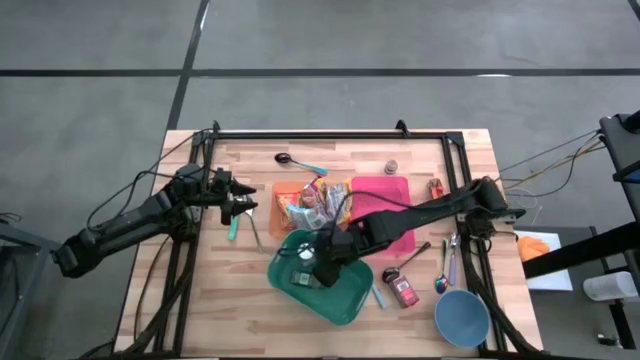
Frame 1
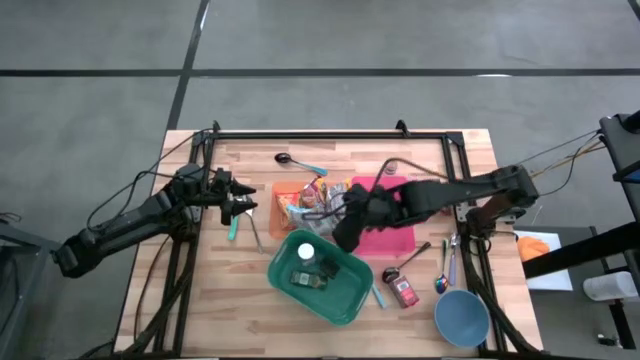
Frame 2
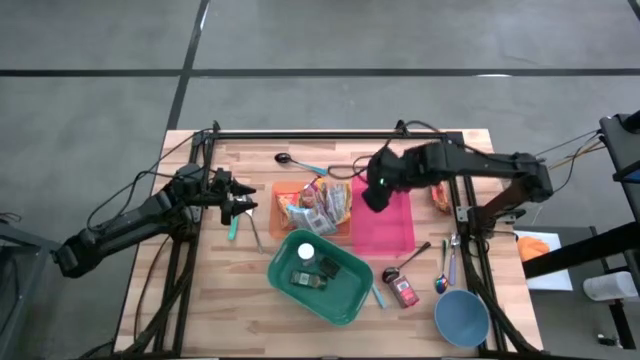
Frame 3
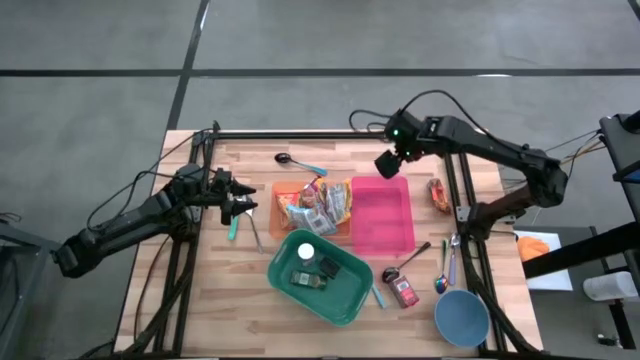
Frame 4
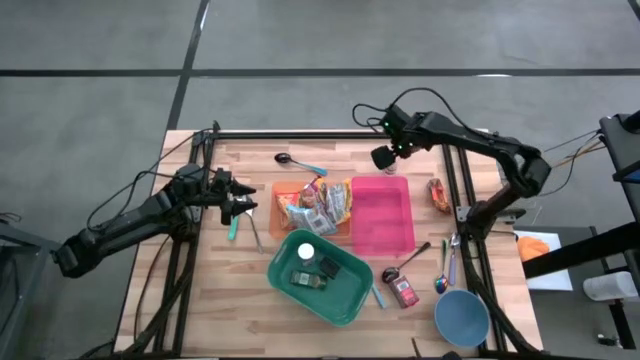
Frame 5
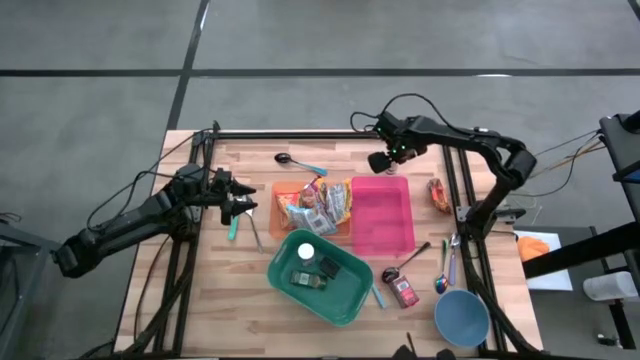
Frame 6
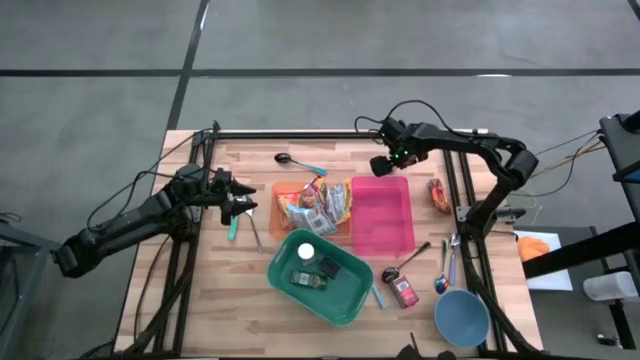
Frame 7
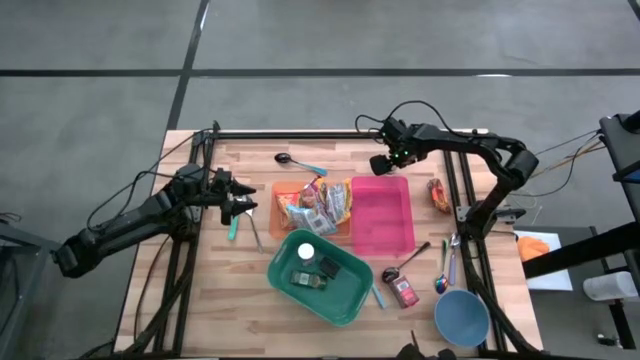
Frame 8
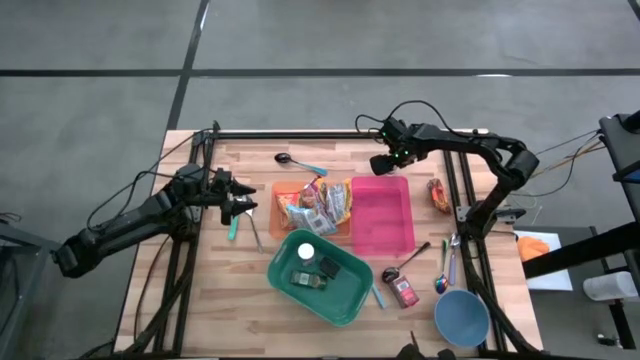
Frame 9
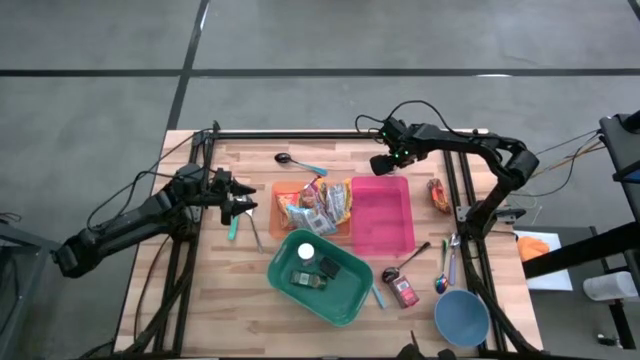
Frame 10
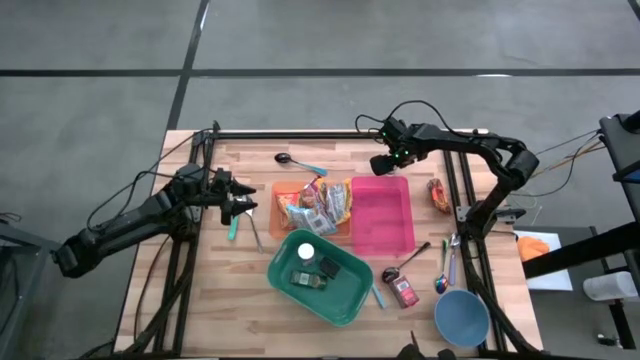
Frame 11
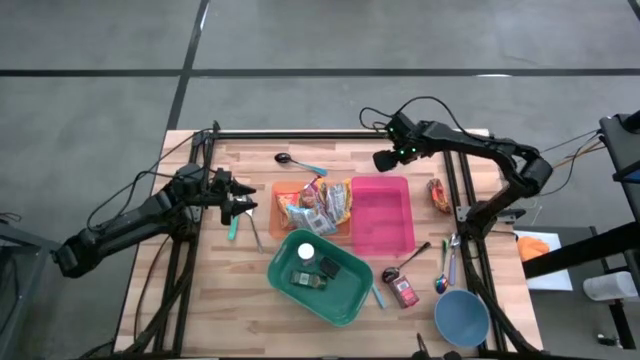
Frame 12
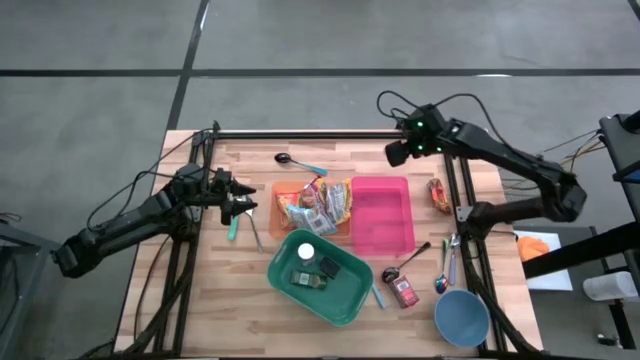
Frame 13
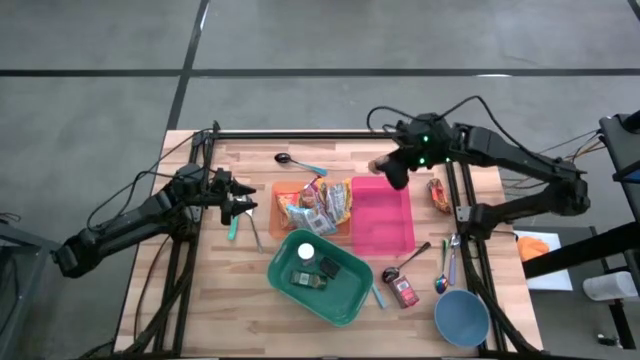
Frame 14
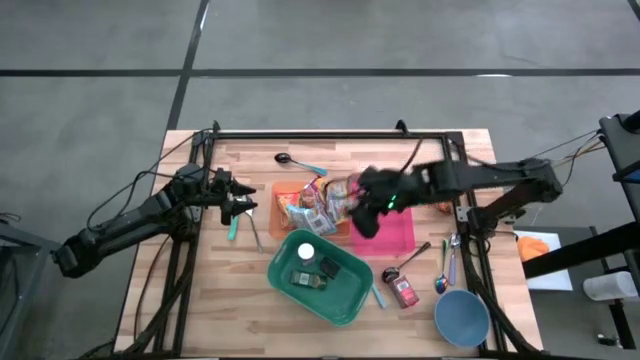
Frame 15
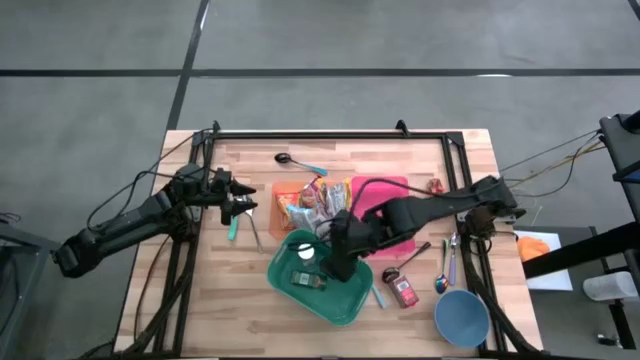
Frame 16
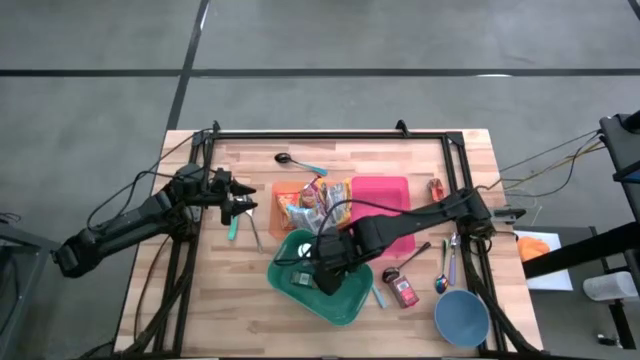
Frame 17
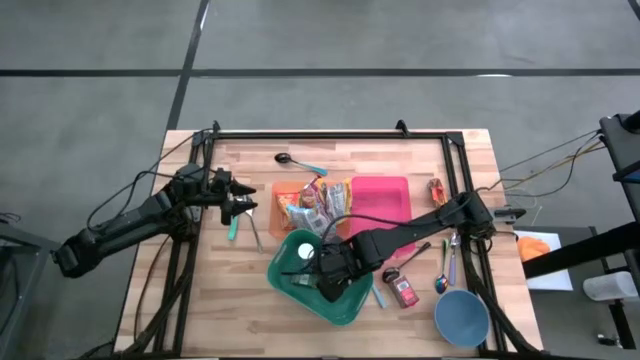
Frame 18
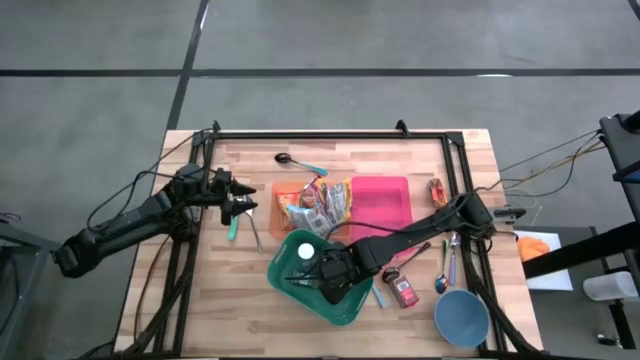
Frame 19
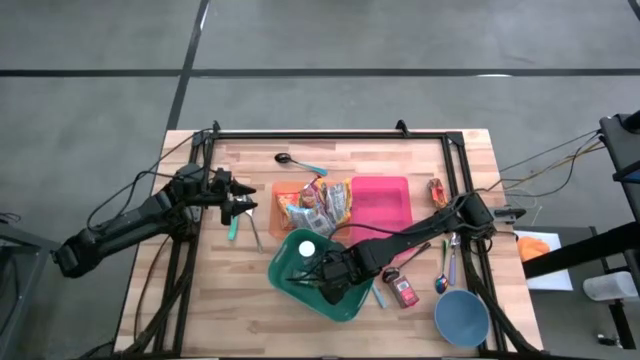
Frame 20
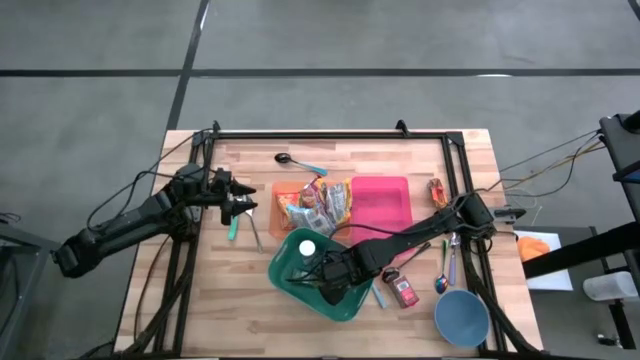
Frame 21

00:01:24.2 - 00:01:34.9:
Put the brown seasoning bottle into the green bin

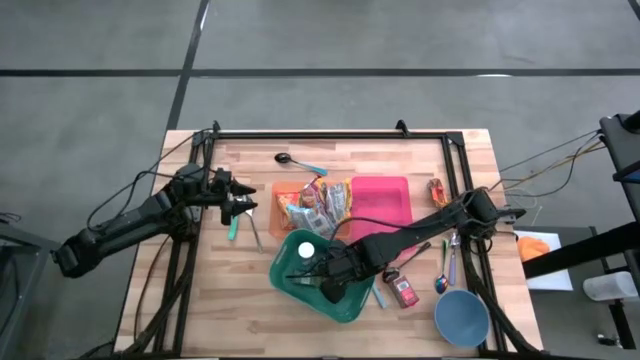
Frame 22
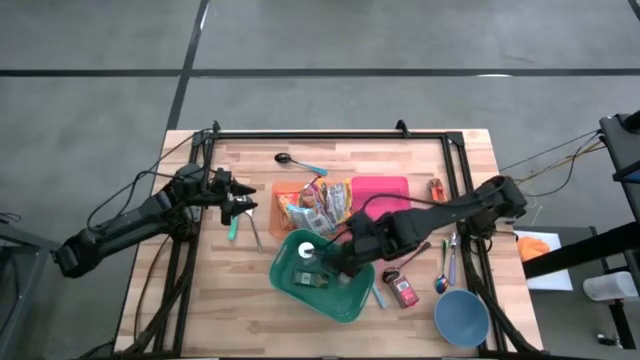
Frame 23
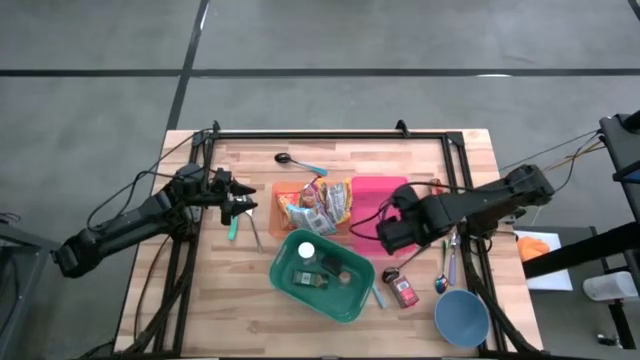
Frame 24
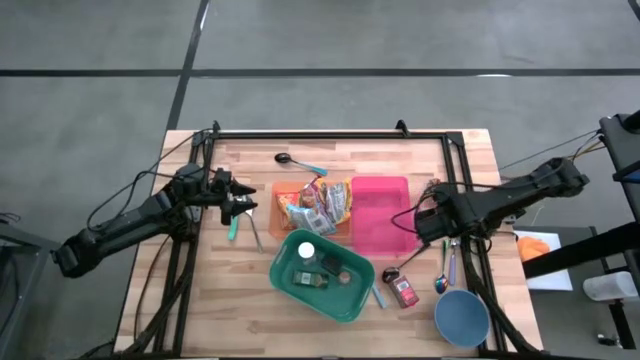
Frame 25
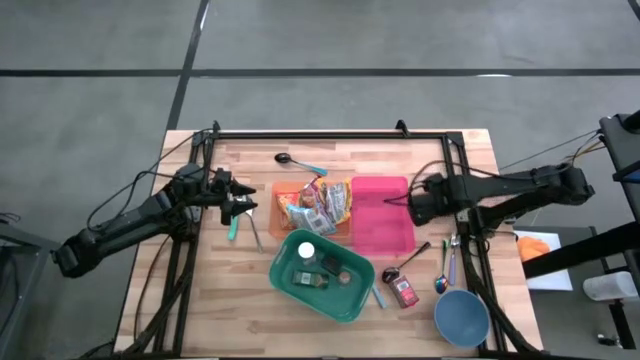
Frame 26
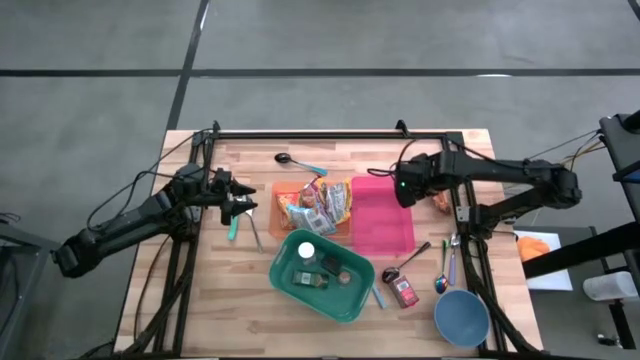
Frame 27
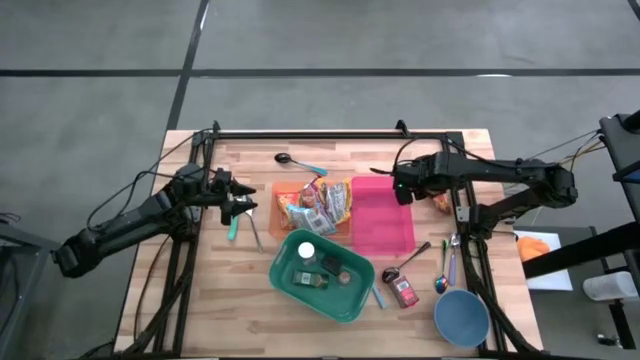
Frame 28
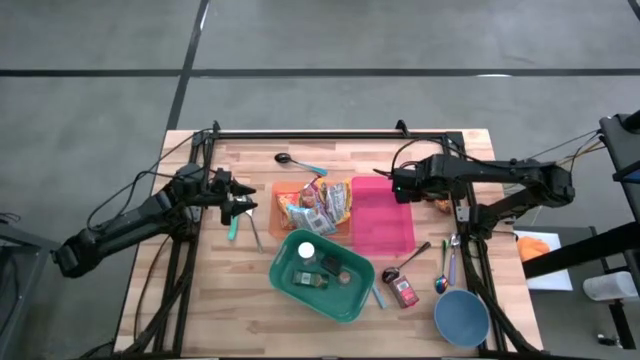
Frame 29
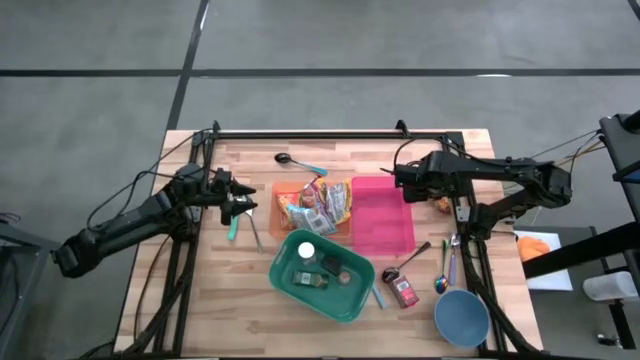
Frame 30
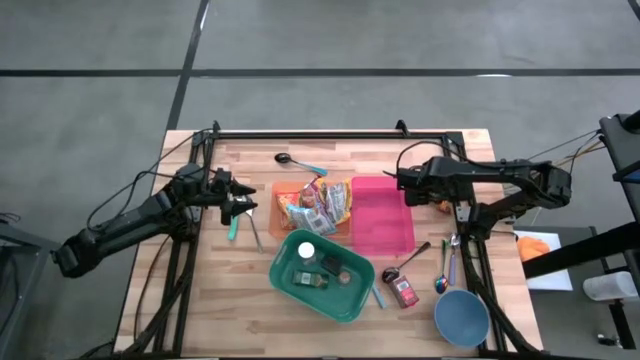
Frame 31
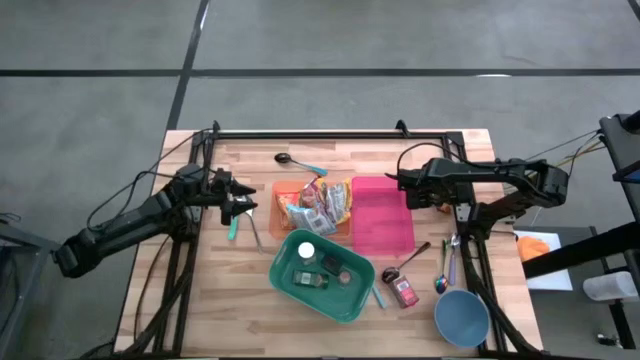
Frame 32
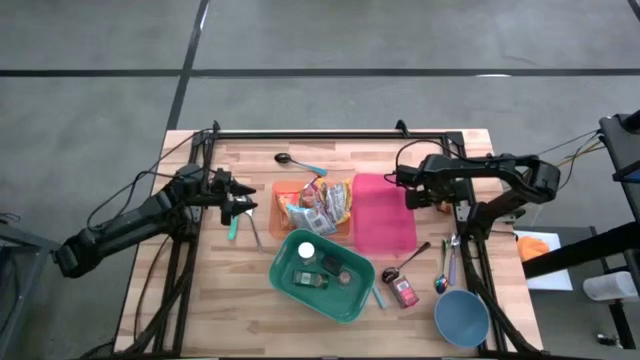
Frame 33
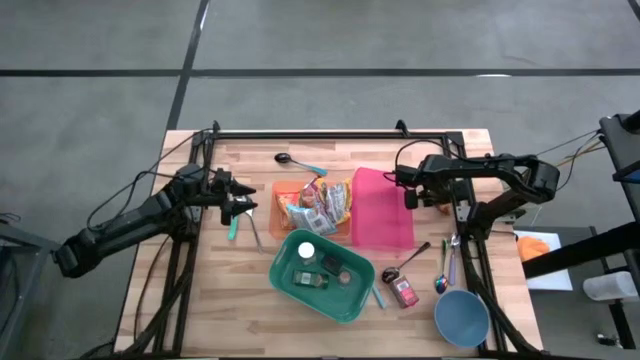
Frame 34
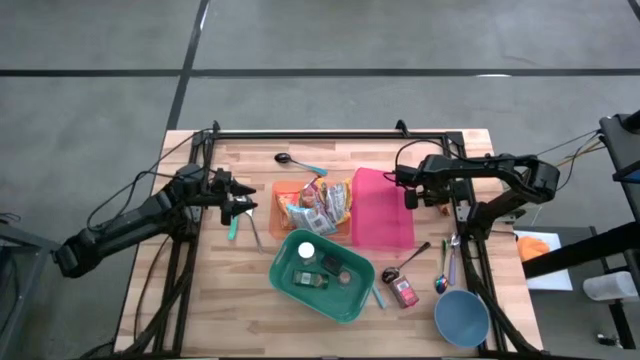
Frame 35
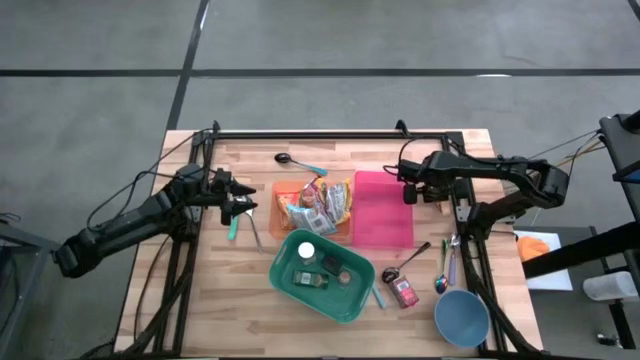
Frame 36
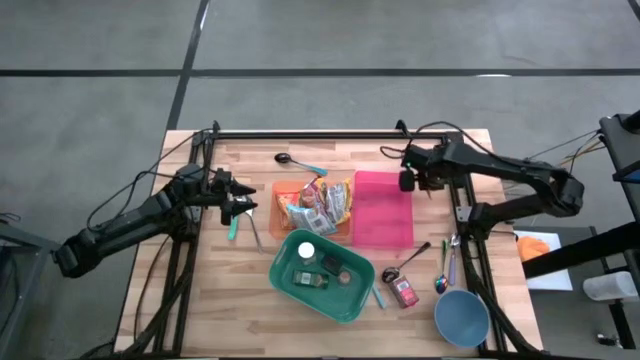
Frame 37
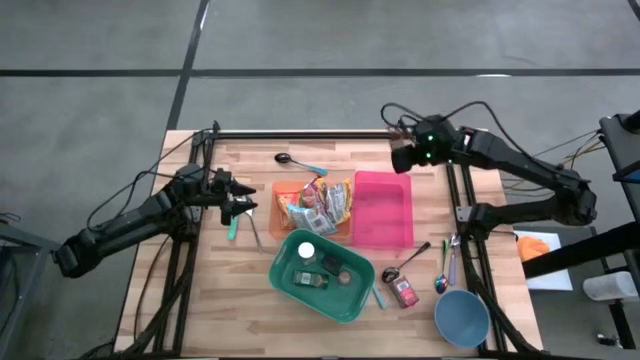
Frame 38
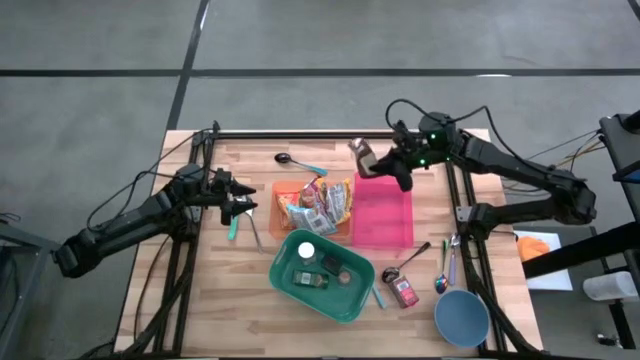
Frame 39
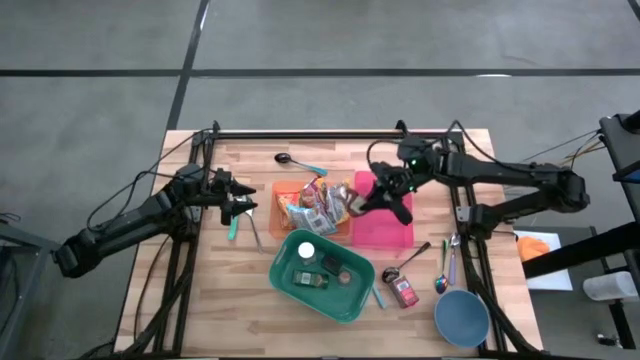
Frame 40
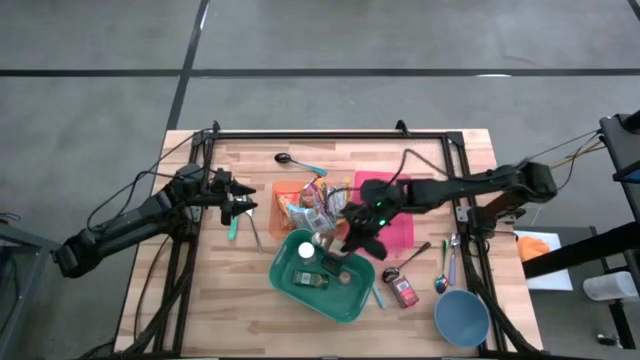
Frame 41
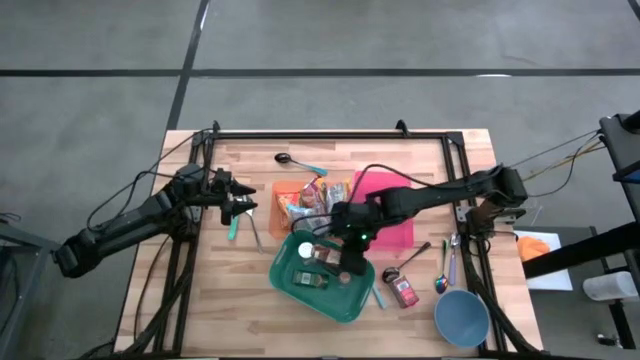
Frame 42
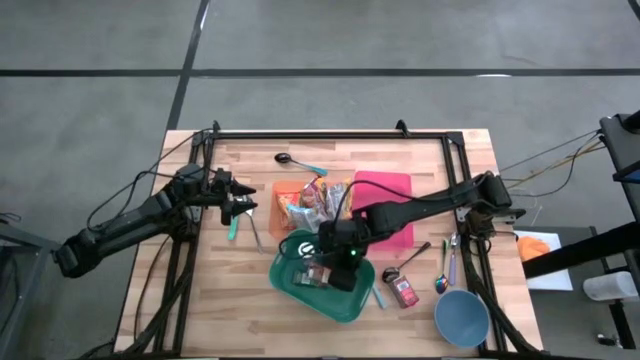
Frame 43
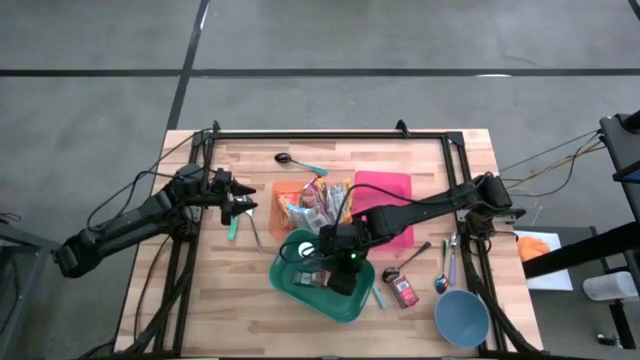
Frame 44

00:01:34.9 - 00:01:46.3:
Put the orange seasoning pack into the green bin
